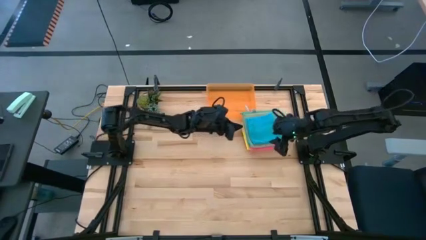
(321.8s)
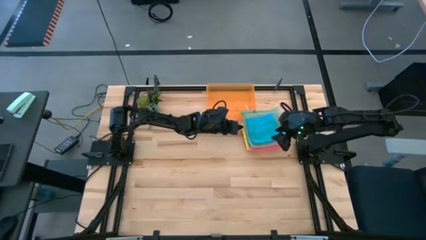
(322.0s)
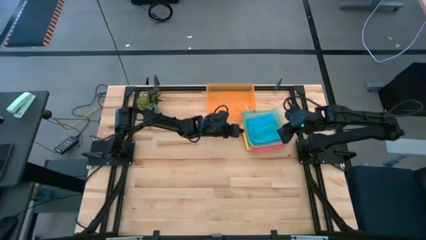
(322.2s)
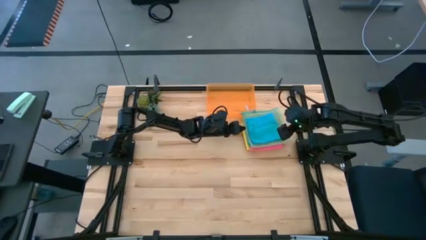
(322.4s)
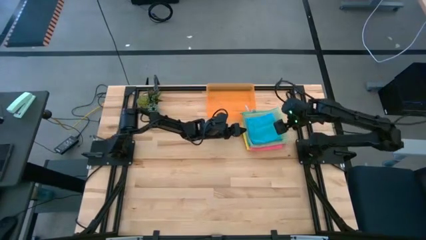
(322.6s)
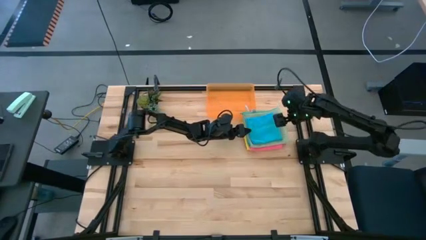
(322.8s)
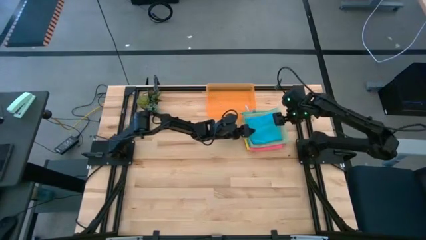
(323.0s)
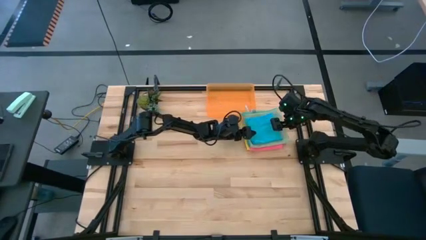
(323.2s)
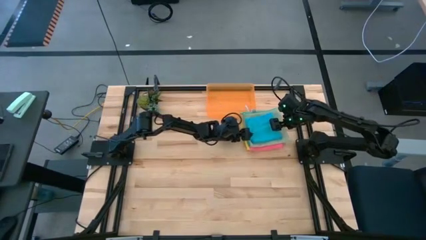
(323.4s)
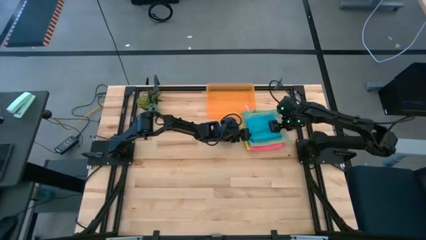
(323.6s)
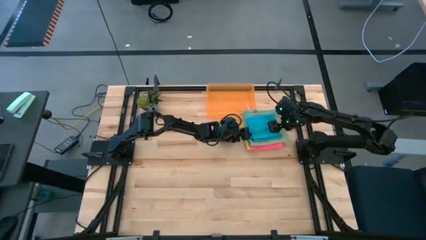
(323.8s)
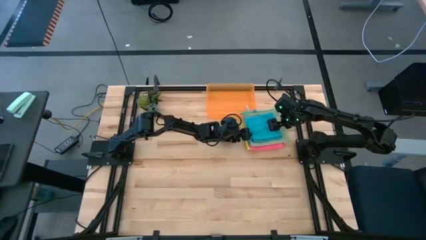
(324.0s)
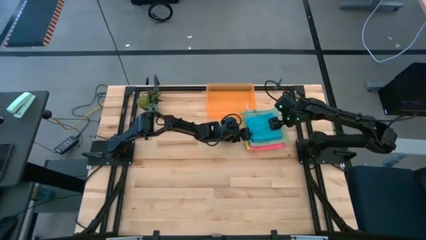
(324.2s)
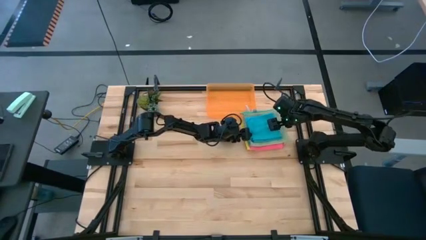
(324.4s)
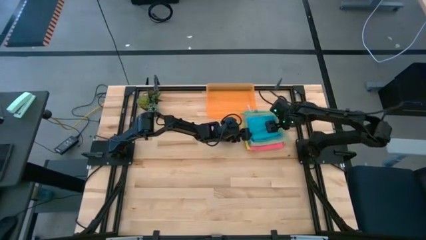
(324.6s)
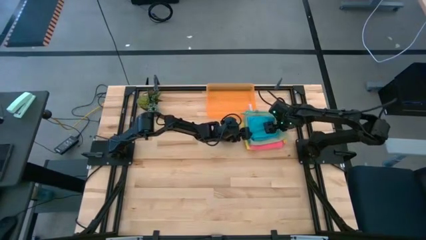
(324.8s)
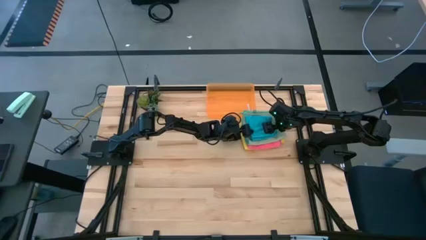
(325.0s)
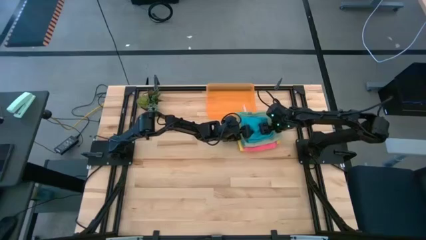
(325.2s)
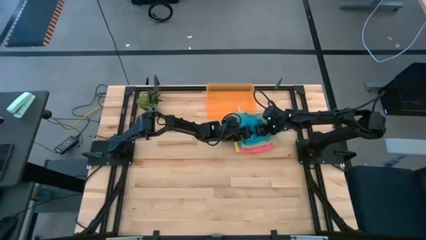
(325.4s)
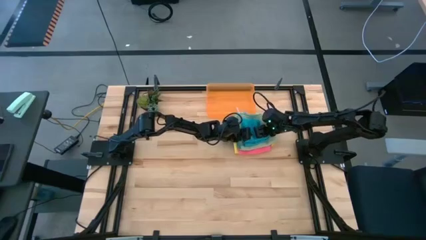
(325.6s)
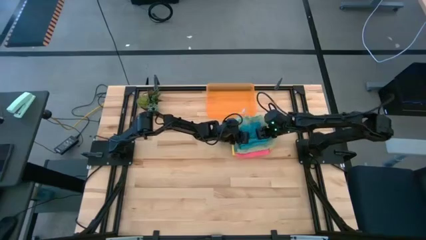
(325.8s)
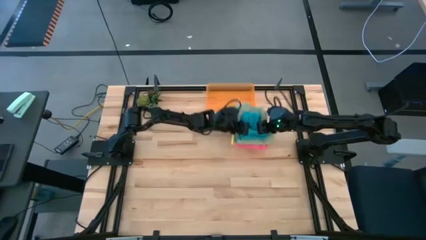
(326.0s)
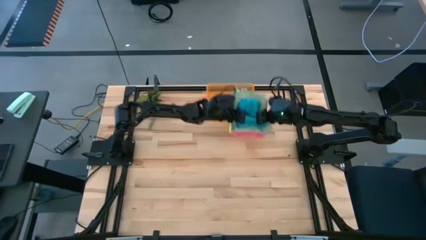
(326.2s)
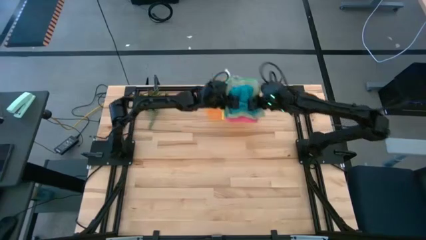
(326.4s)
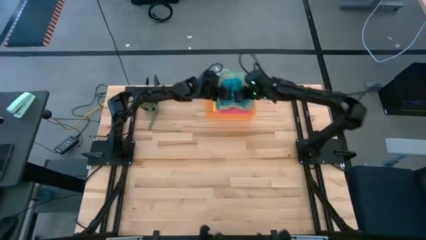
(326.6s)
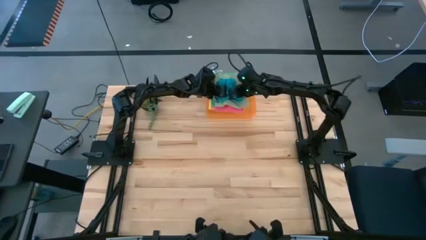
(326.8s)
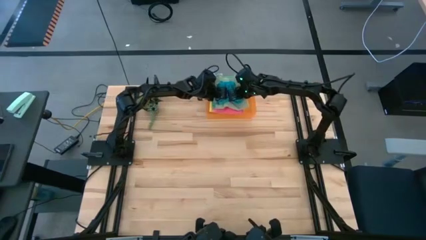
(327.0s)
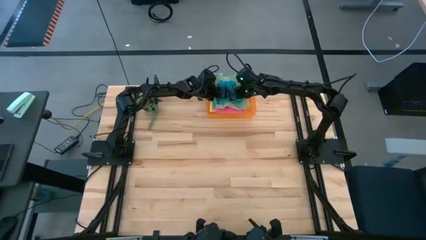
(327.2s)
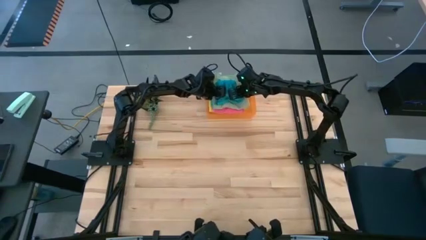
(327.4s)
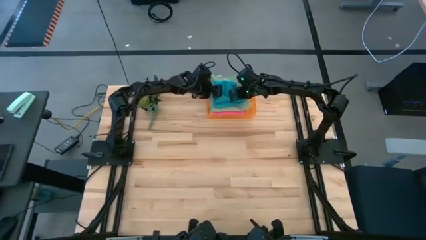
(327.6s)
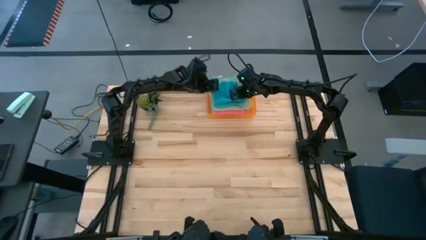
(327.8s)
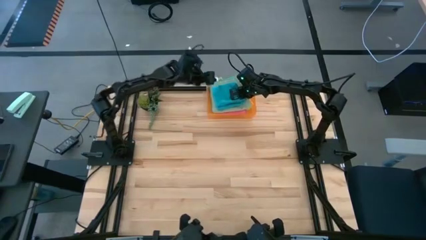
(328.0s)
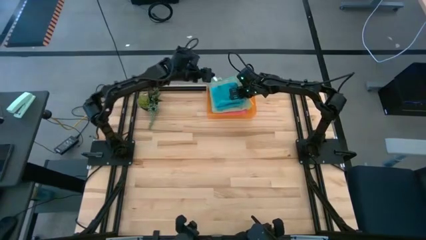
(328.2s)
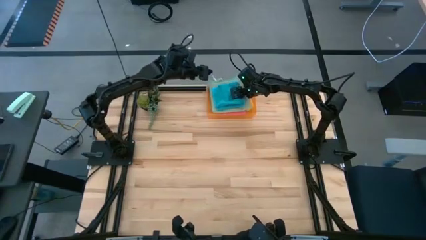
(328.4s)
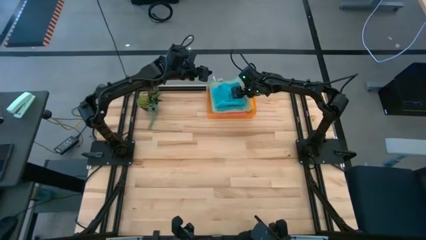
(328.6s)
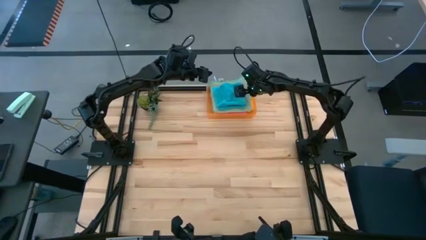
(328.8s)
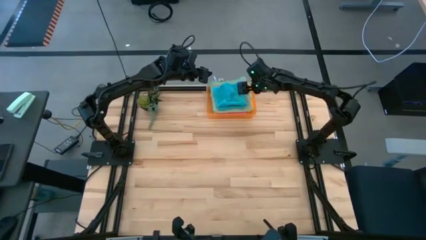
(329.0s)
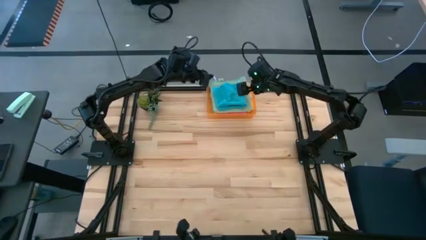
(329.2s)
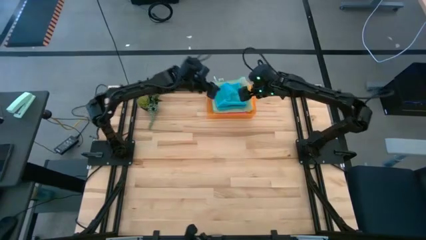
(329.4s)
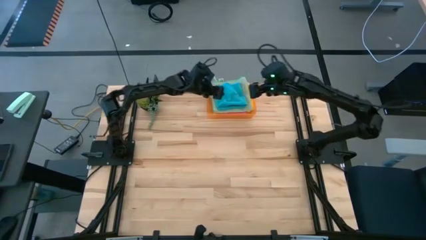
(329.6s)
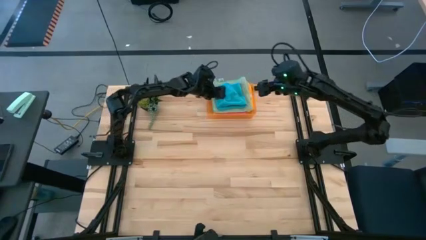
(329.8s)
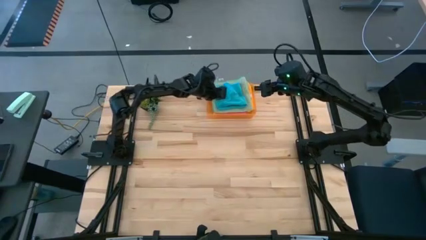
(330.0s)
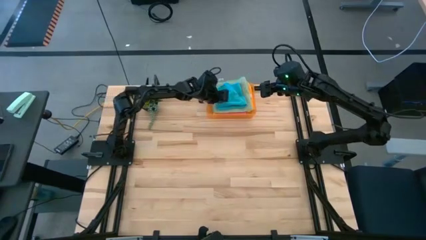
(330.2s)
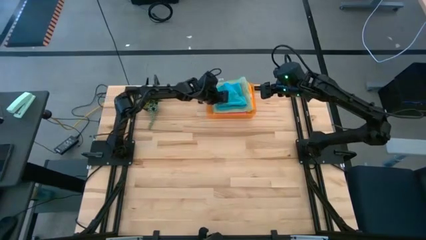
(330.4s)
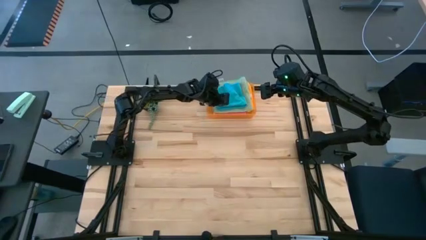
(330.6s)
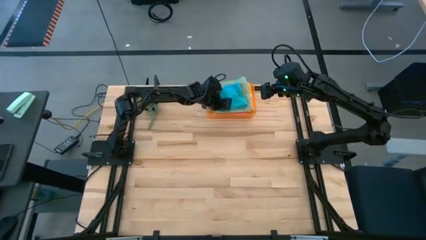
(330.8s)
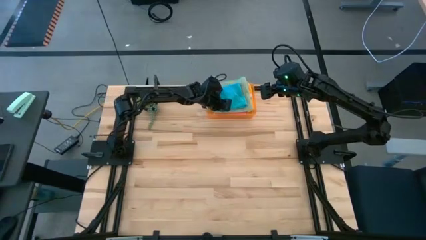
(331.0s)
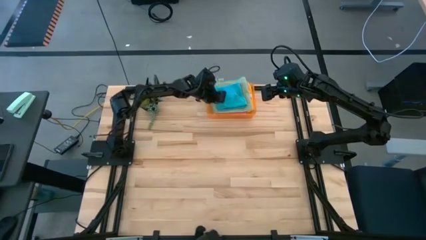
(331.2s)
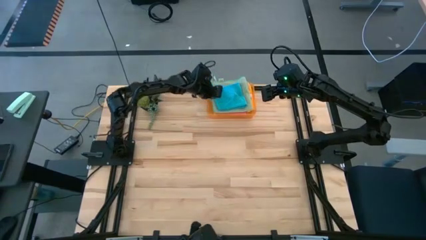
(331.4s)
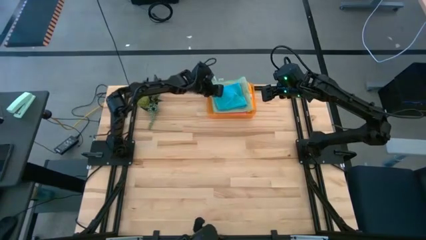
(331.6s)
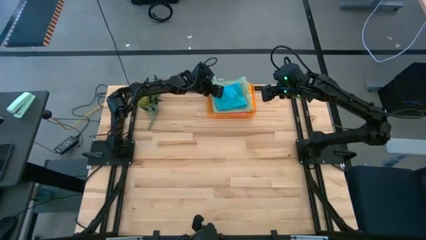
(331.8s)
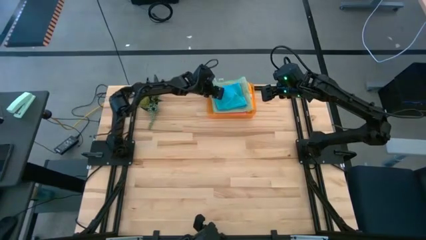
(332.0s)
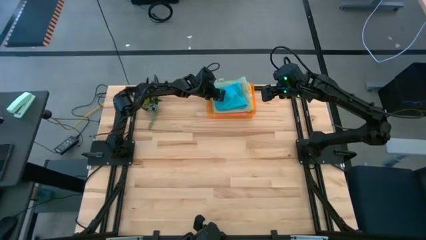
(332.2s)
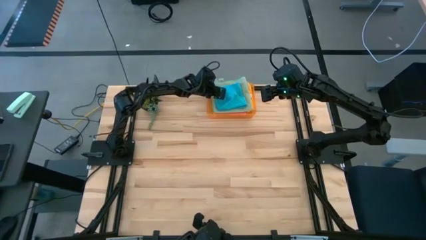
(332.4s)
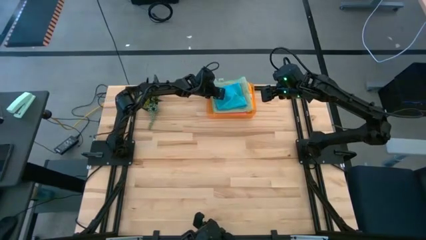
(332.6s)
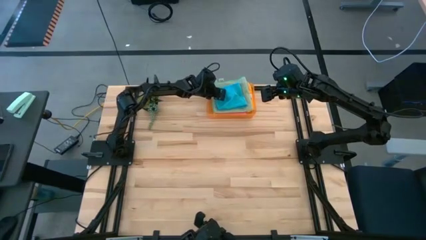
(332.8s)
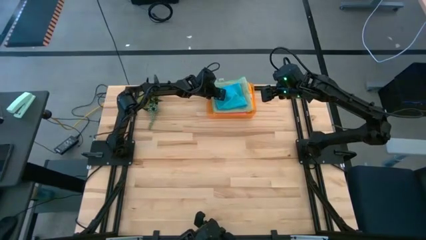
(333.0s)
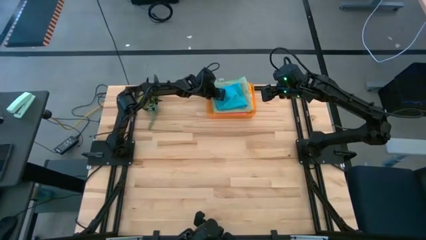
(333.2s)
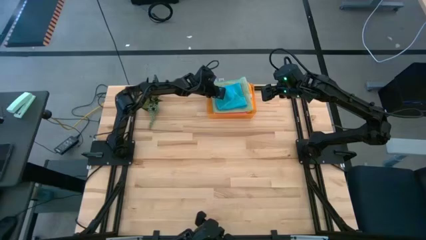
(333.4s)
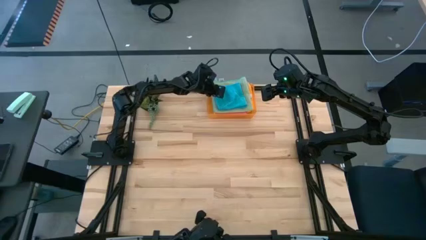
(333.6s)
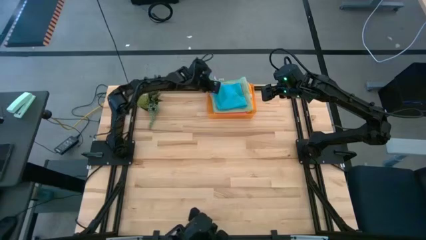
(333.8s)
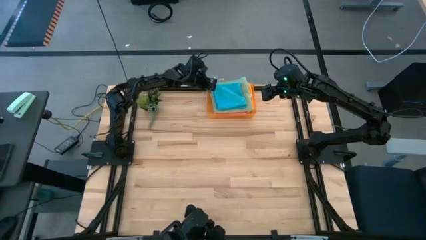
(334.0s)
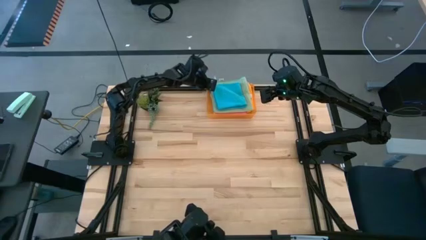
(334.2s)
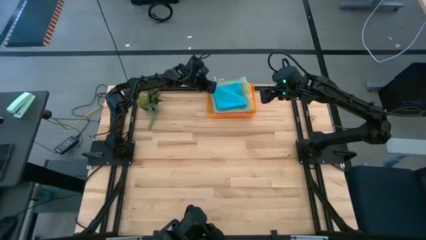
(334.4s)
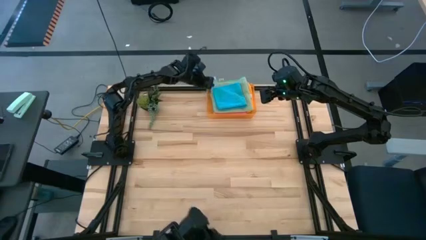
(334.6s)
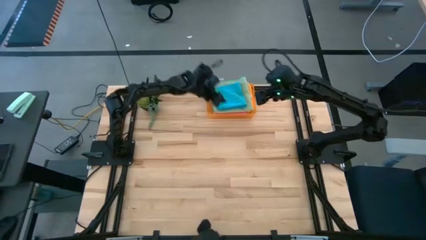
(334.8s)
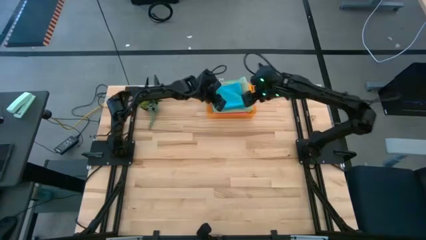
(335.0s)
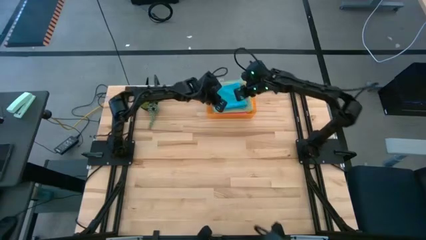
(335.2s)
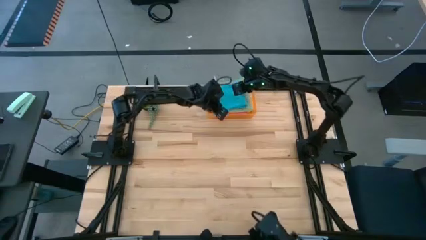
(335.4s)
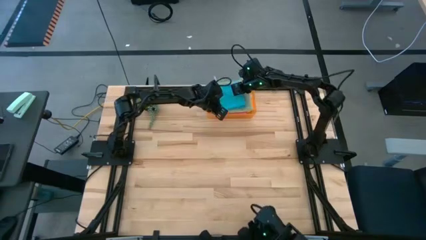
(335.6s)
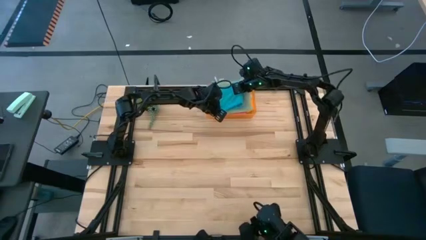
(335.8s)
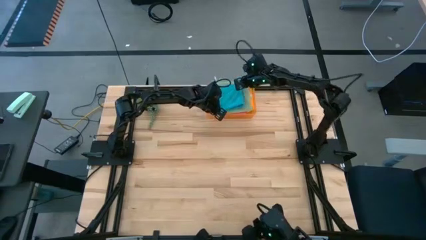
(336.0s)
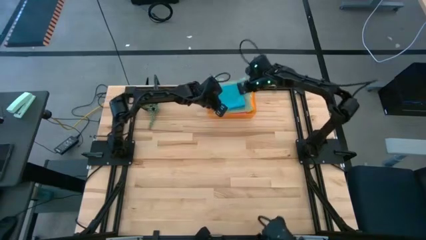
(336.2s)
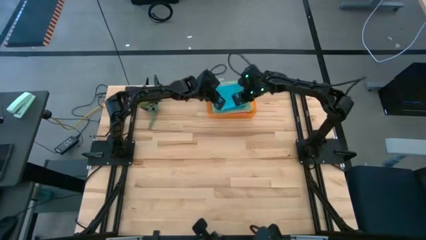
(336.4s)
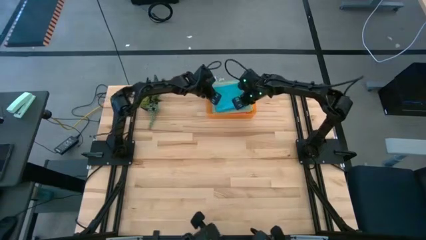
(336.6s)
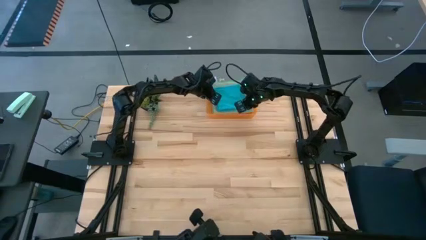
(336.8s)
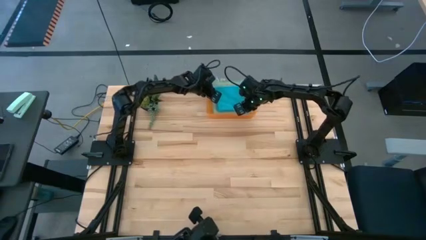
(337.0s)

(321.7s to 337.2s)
Task: Fold microfiber towels
Put the stacked folded microfiber cloths into the orange bin
